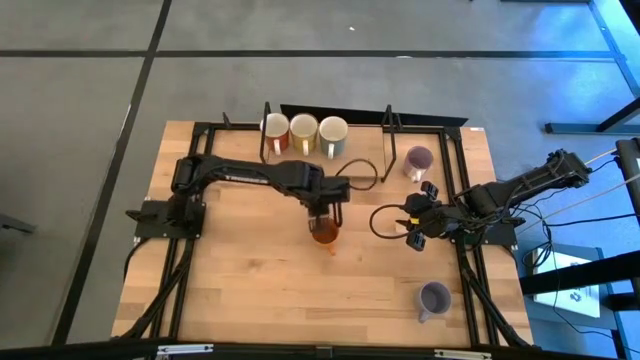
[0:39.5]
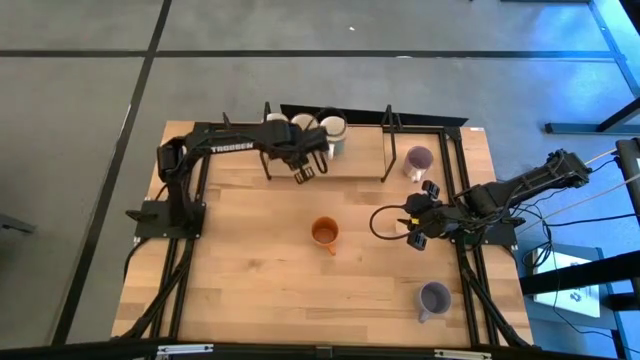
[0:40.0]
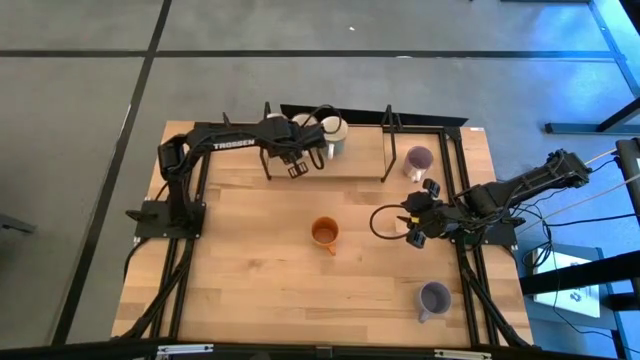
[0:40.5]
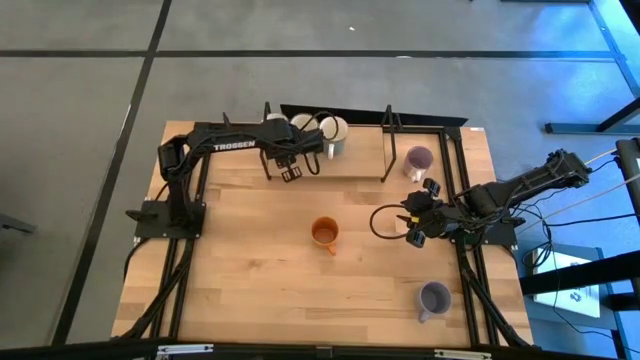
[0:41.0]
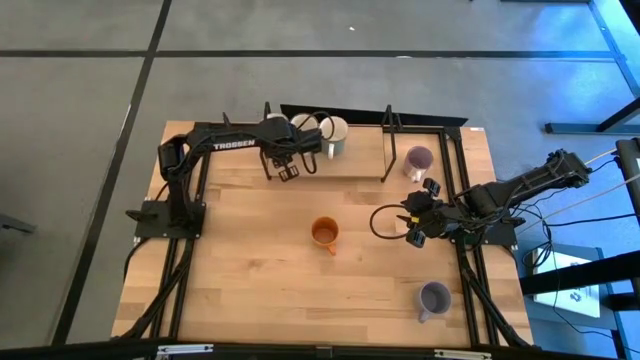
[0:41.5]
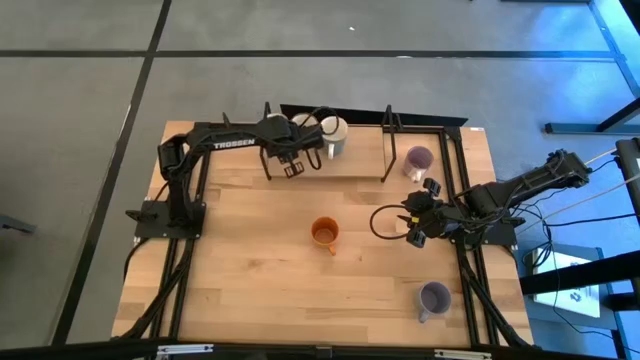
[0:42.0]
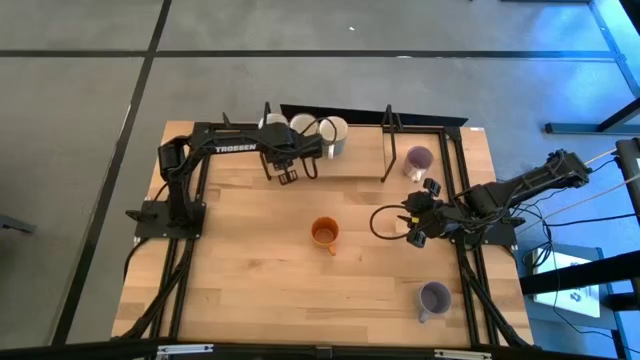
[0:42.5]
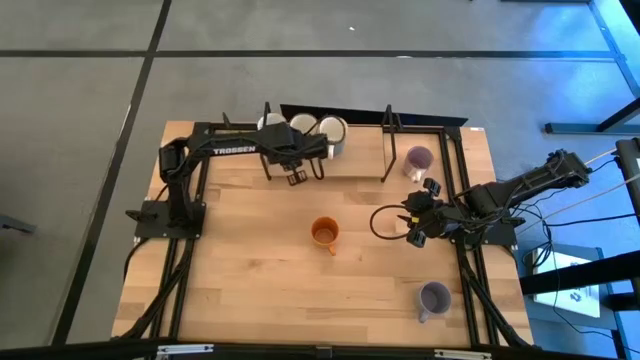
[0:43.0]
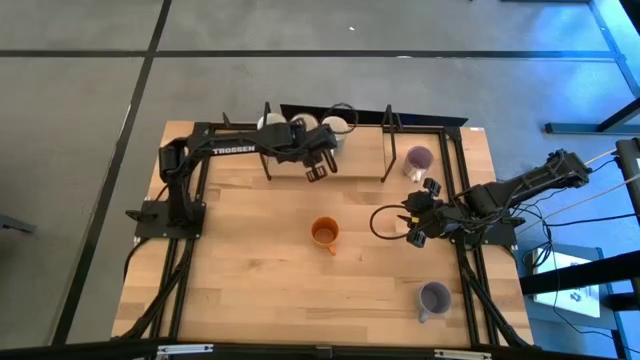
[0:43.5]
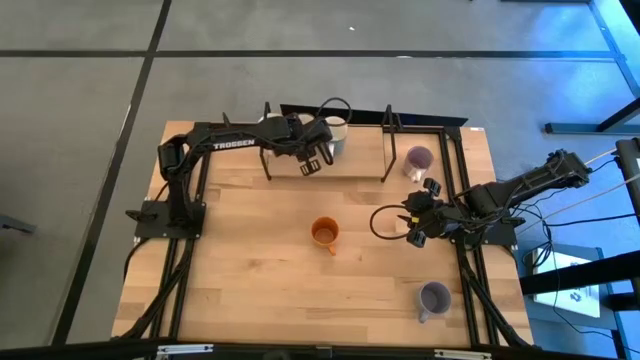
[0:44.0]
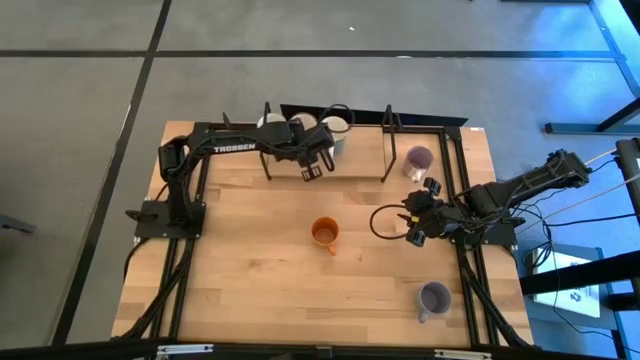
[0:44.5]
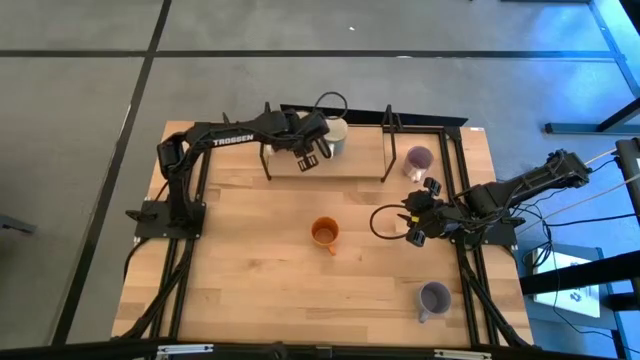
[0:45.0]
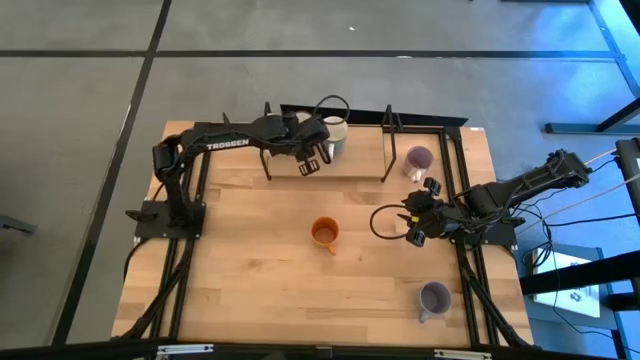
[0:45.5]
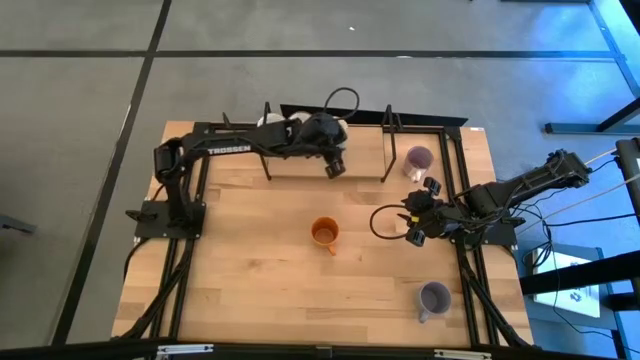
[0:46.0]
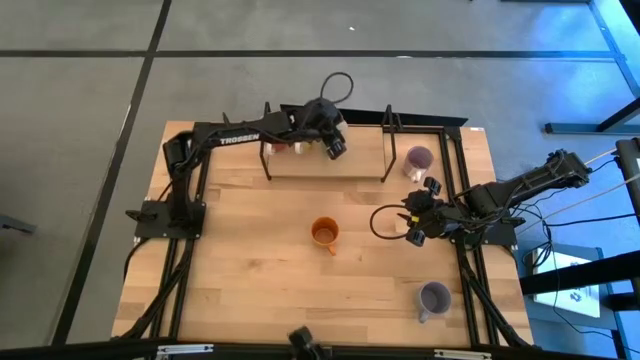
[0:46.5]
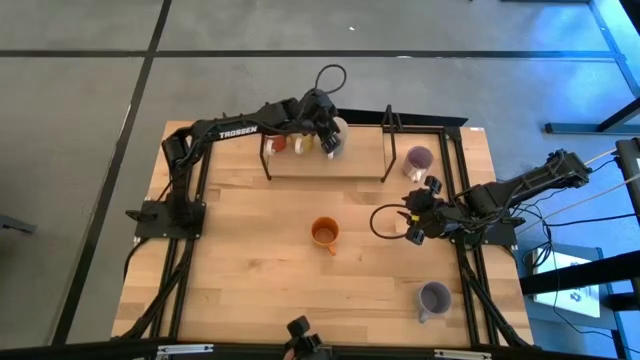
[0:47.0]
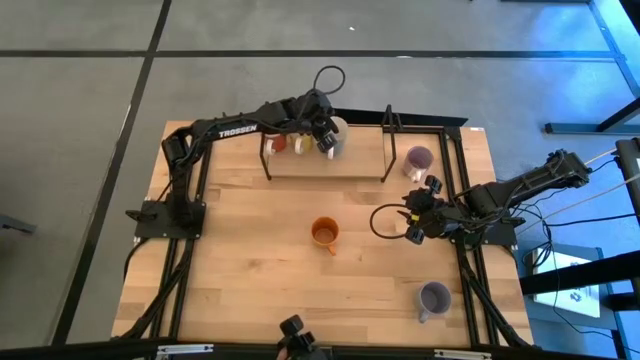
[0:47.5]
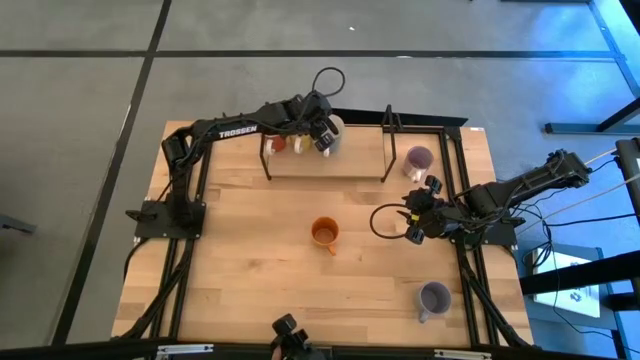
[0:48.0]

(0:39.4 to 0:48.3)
Task: Place coffee mugs
Adjust the mugs on the shelf

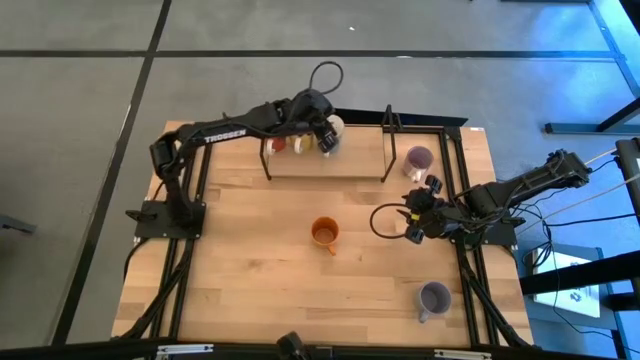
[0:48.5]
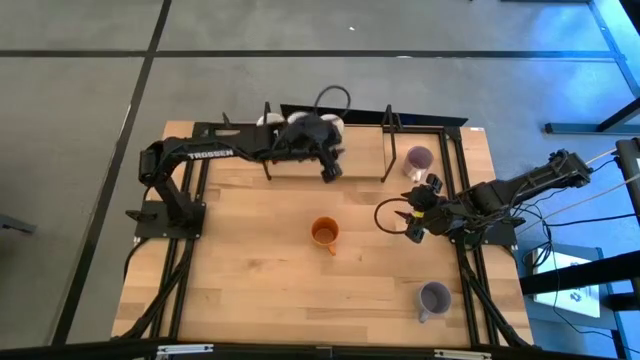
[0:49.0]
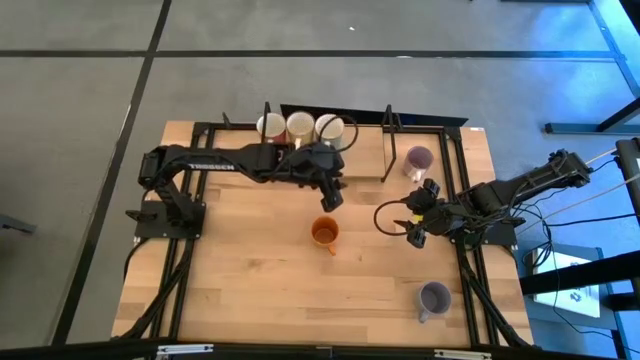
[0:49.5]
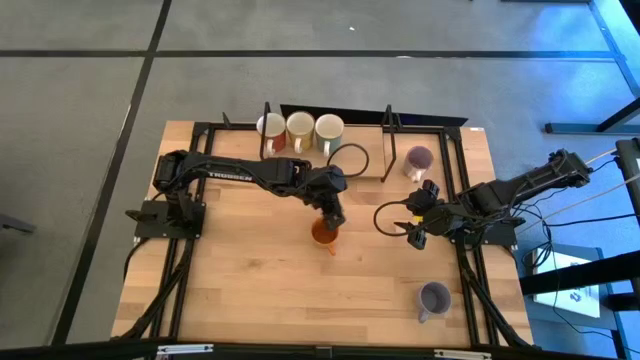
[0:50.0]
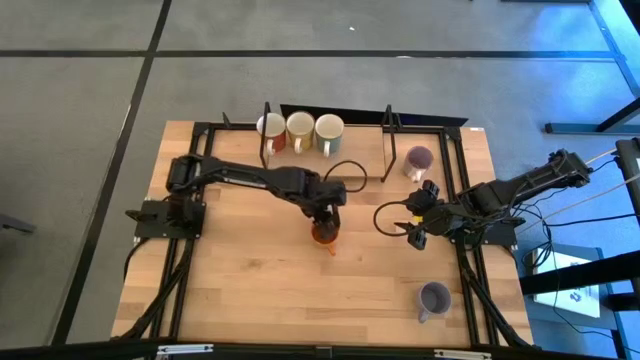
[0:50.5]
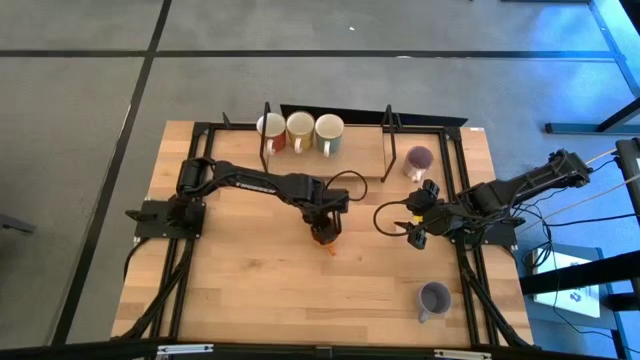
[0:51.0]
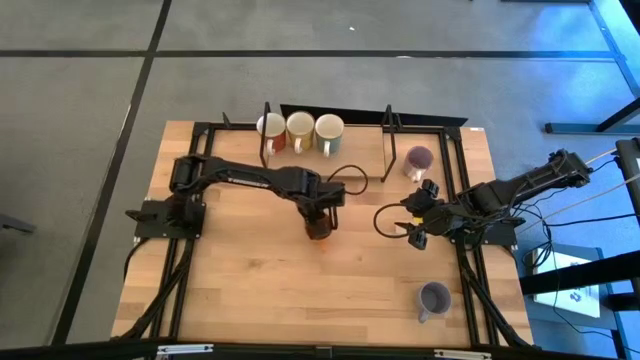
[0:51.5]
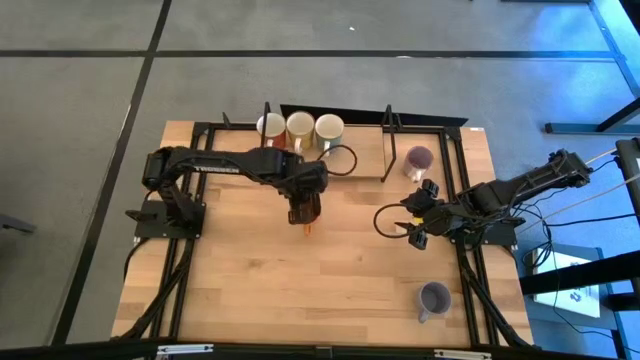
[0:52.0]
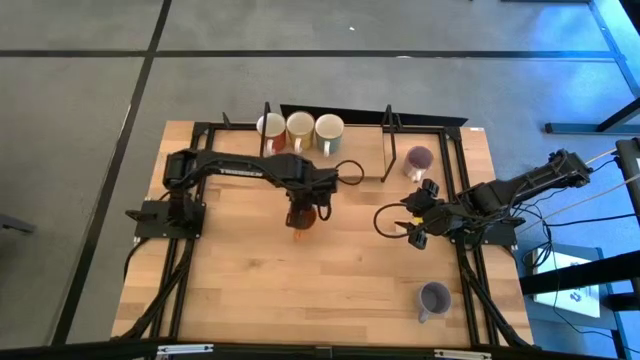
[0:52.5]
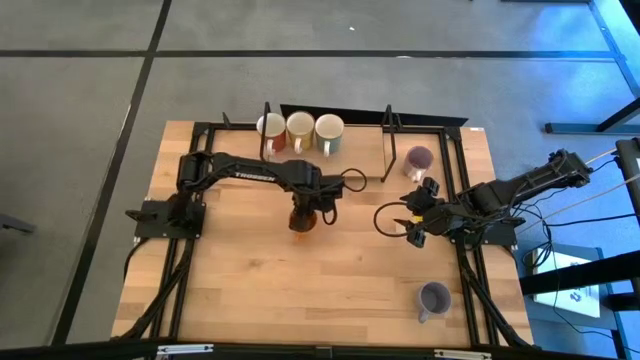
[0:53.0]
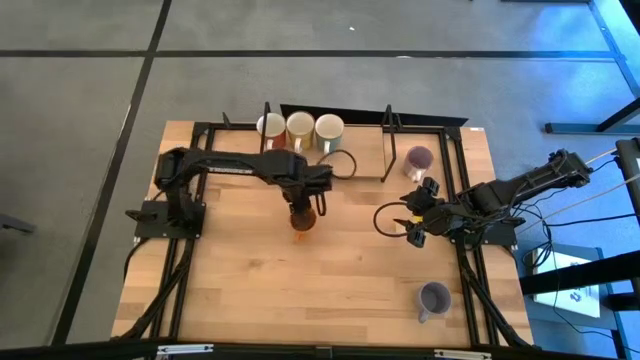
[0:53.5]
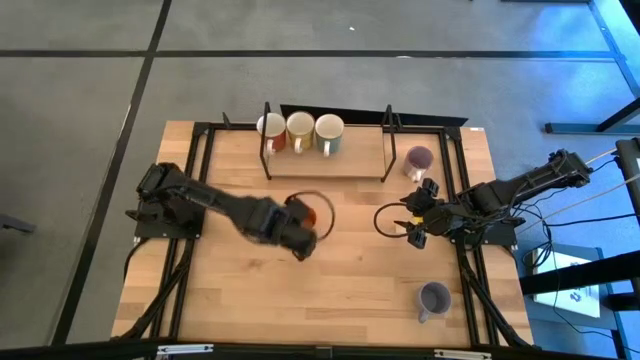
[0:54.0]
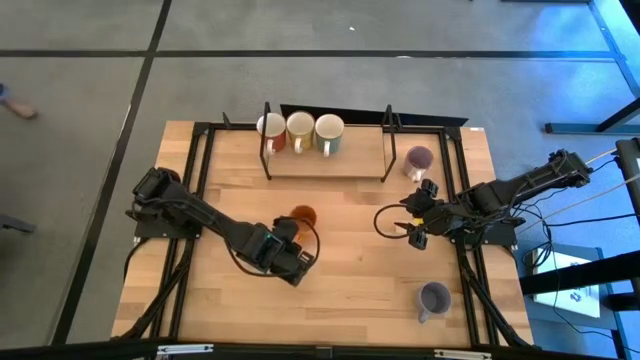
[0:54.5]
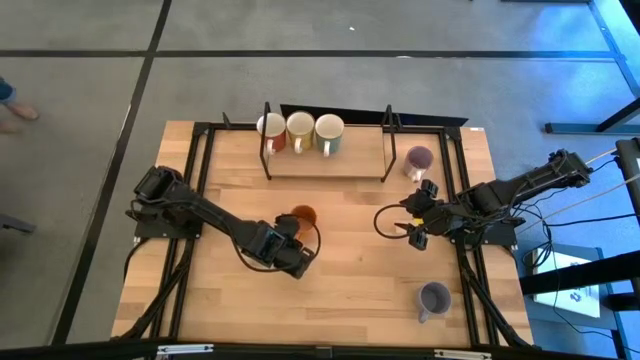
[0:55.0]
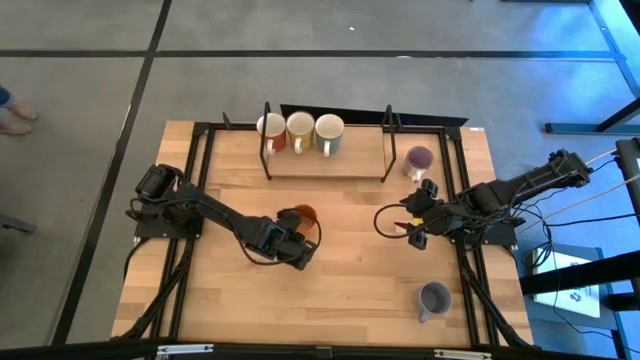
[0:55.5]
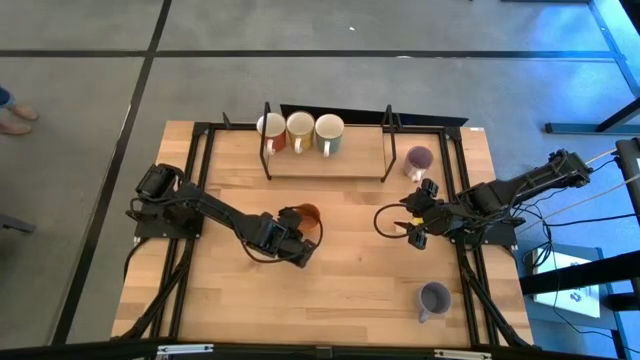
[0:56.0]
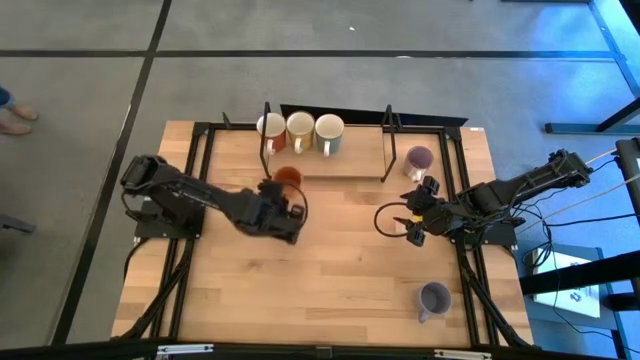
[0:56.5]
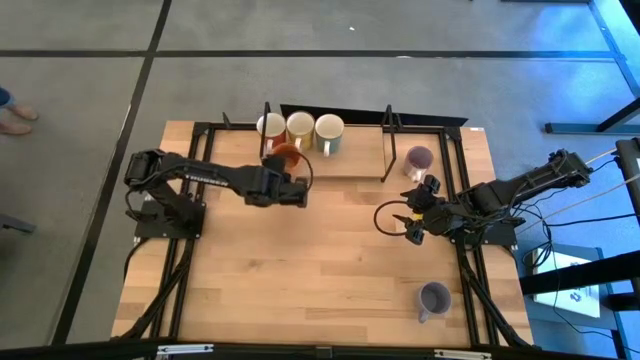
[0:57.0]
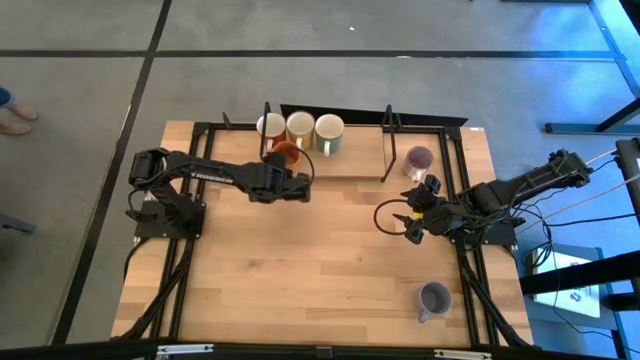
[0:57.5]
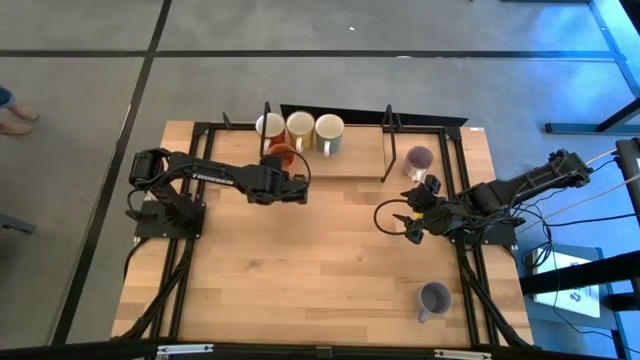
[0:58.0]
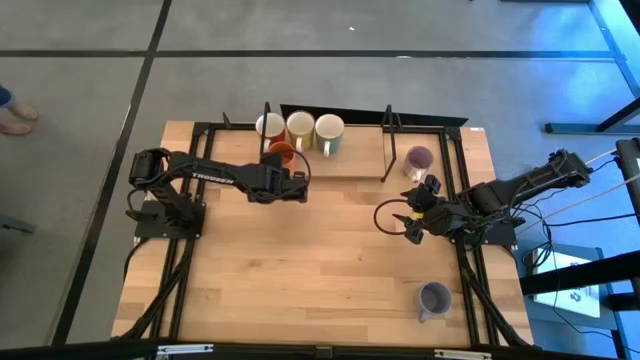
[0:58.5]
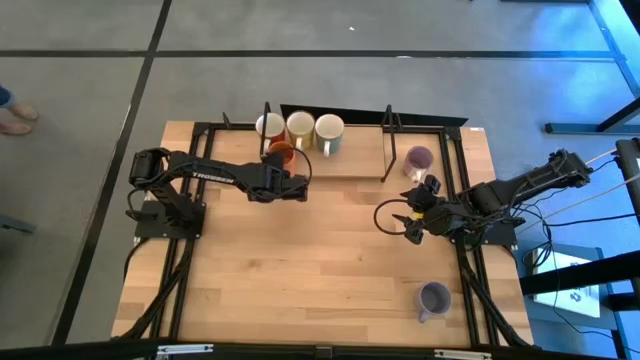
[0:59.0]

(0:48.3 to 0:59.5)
Put the orange mug on the shelf

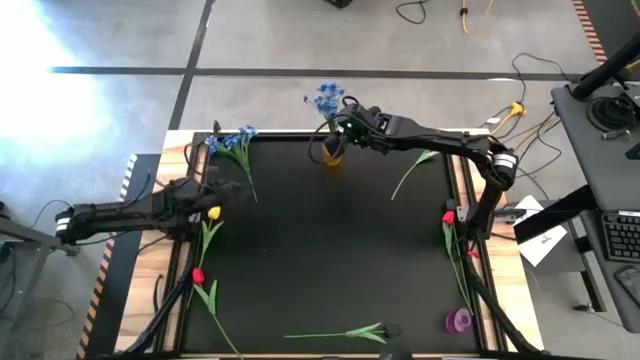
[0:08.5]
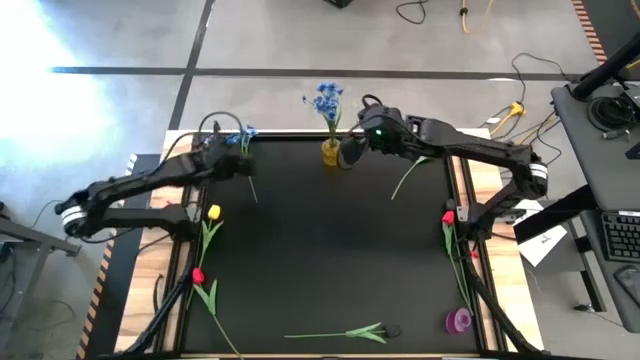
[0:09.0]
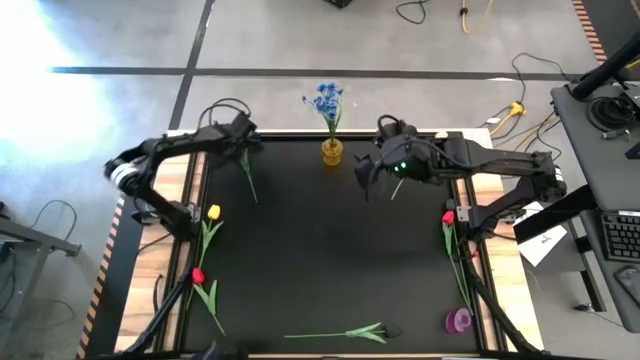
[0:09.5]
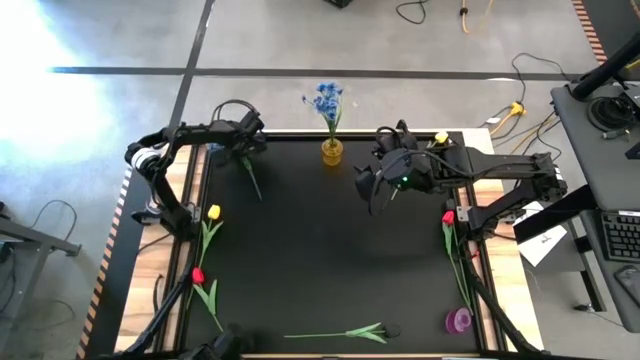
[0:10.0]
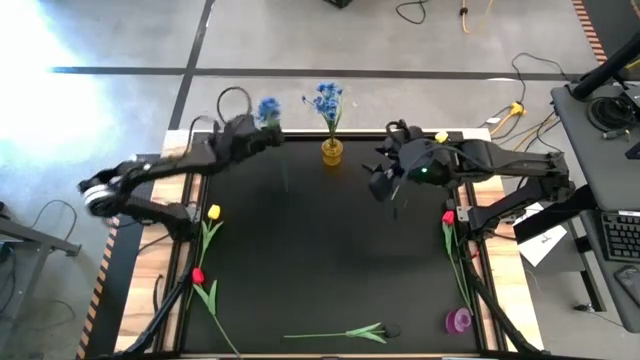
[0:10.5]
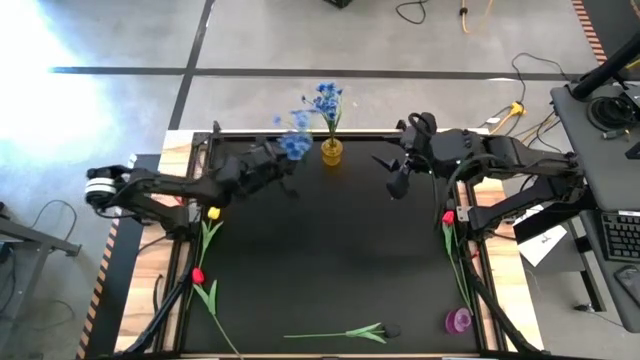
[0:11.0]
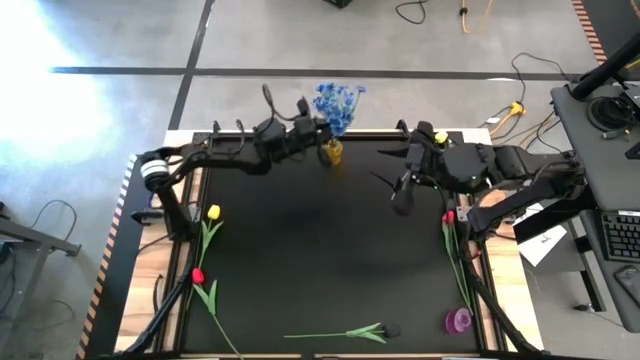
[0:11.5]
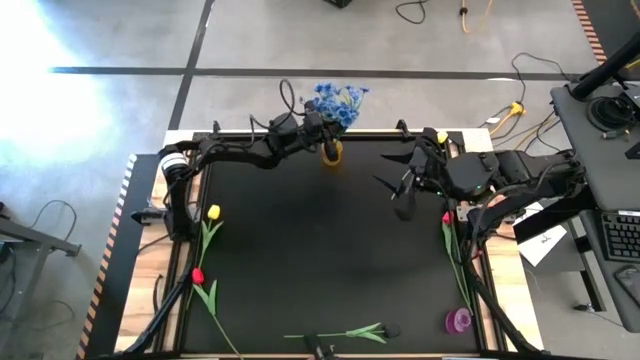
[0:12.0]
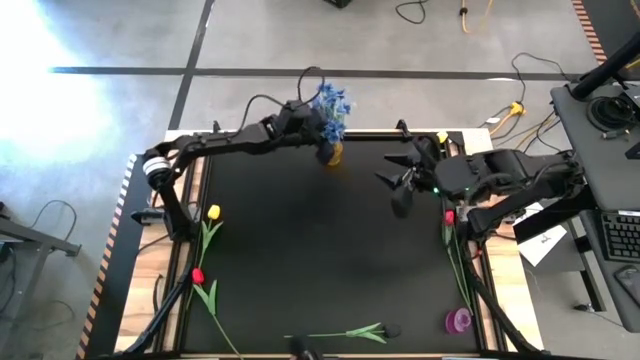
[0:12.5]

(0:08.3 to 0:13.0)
Task: Sort flowers into vase by color
Put the blue flowers into the yellow vase
